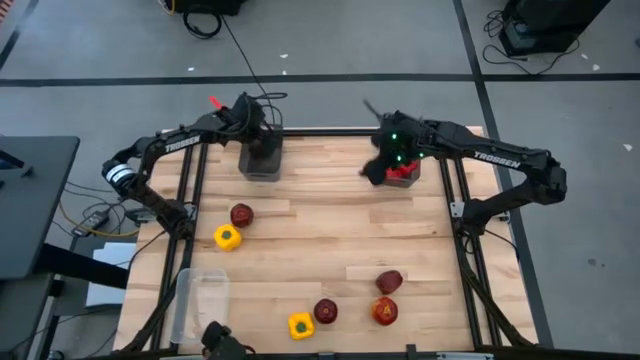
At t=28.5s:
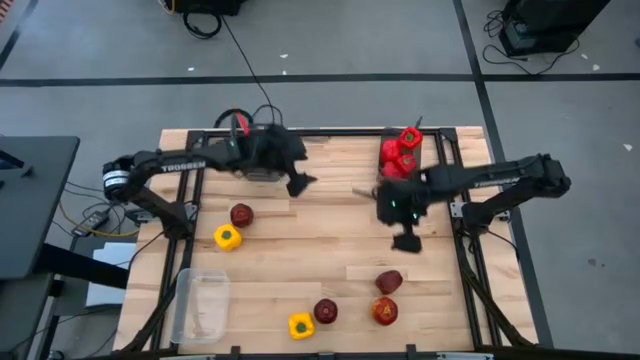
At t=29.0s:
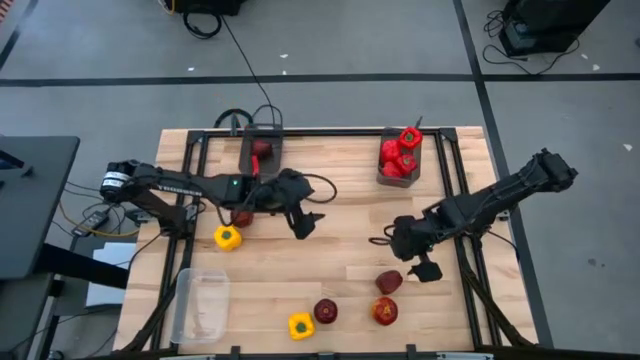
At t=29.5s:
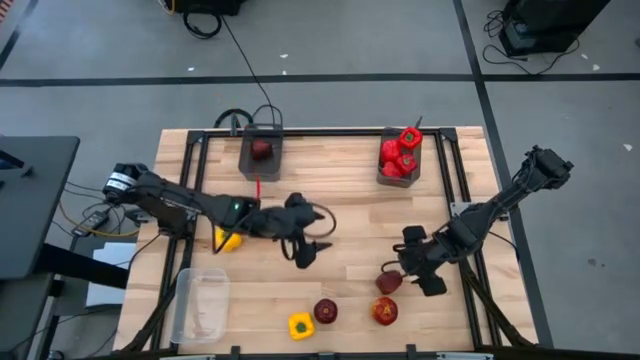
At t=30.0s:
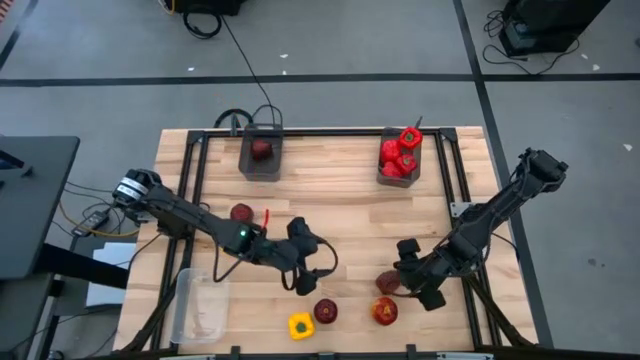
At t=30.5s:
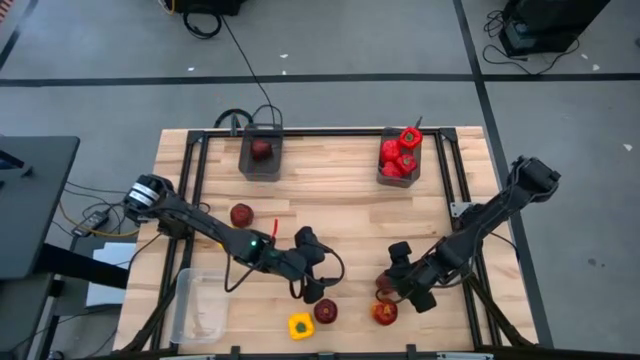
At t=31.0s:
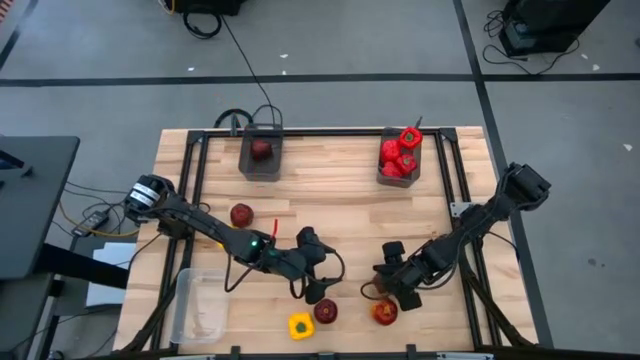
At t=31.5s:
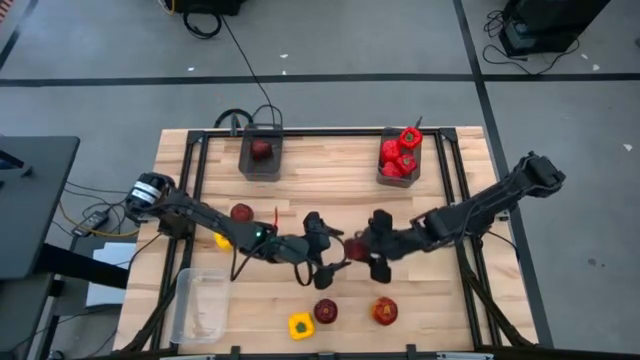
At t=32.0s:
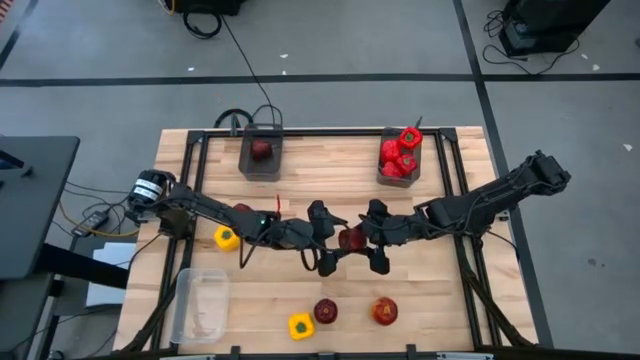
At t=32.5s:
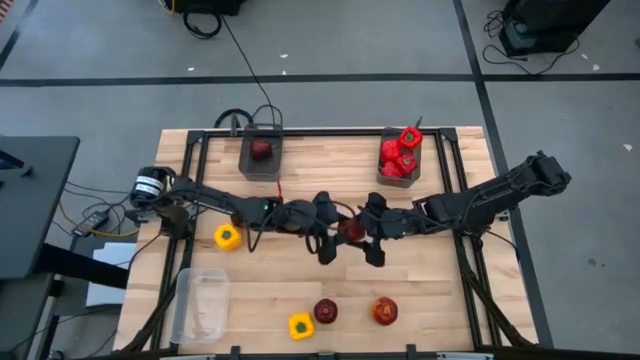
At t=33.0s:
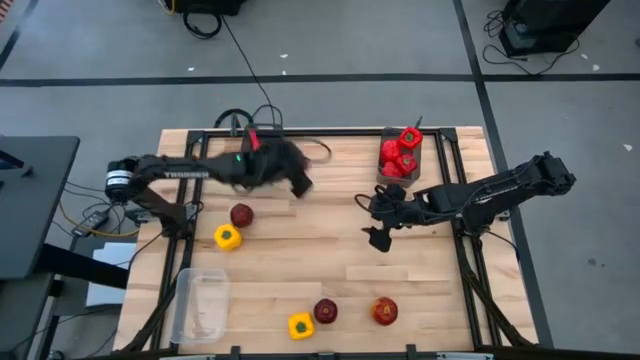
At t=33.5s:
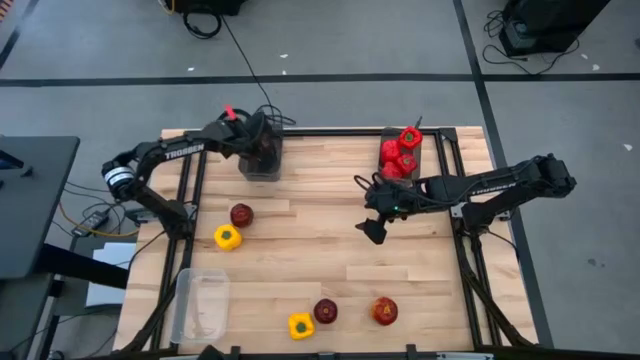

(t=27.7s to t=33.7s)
Task: Sort produce into baskets
Put the red apple into the top left black transparent bin

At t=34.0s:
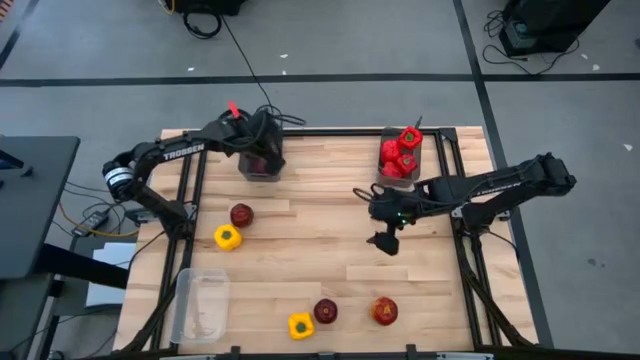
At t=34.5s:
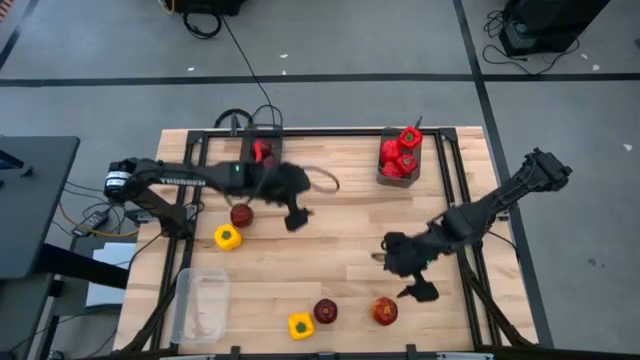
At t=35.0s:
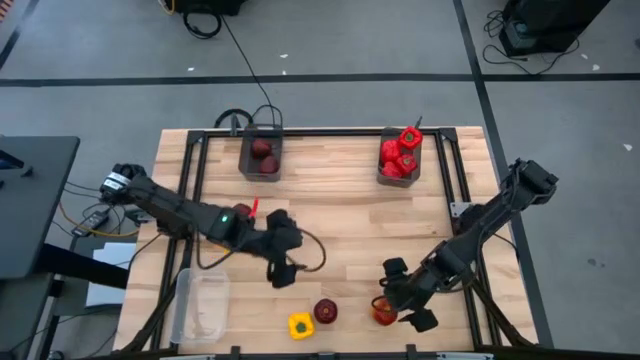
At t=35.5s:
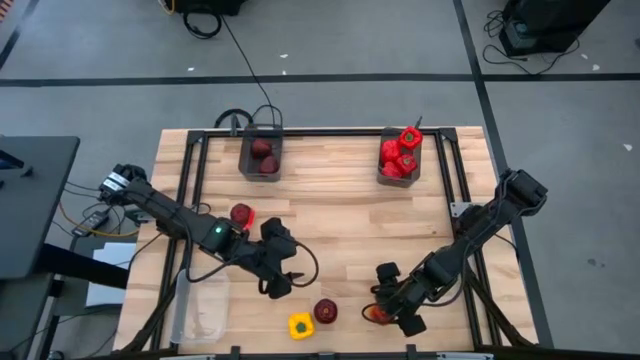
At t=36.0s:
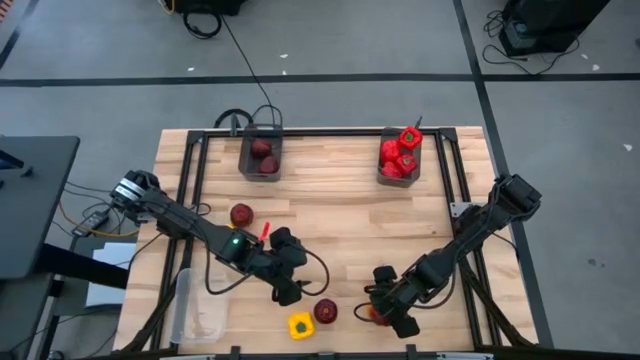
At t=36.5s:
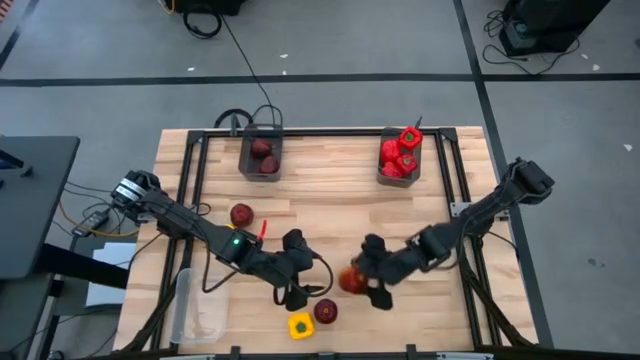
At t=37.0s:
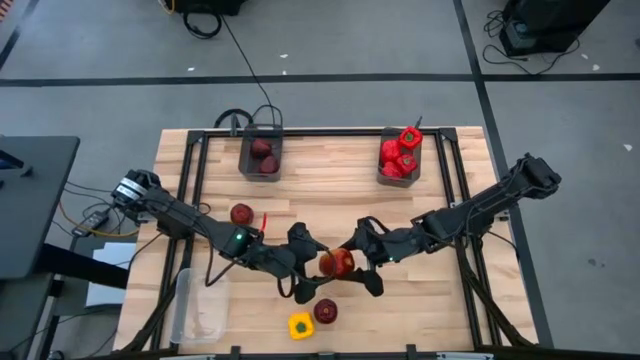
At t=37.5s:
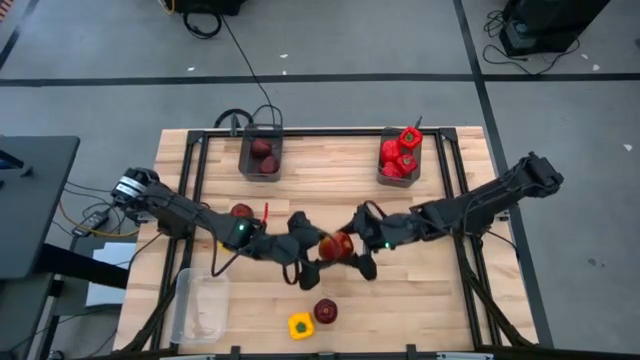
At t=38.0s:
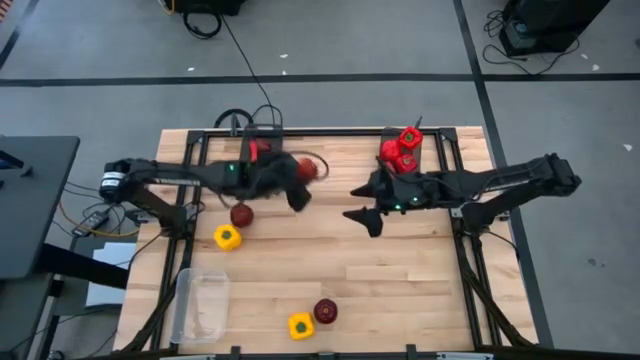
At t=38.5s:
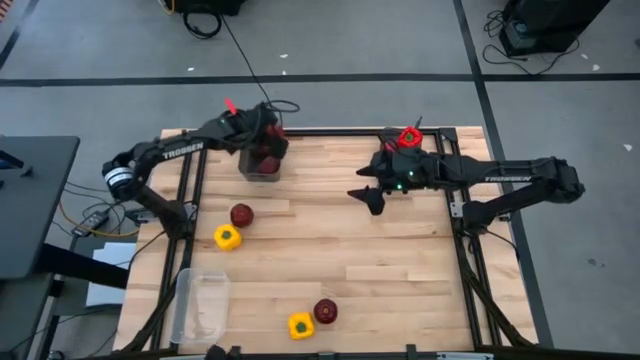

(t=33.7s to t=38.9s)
Put the red apple into the top left black transparent bin

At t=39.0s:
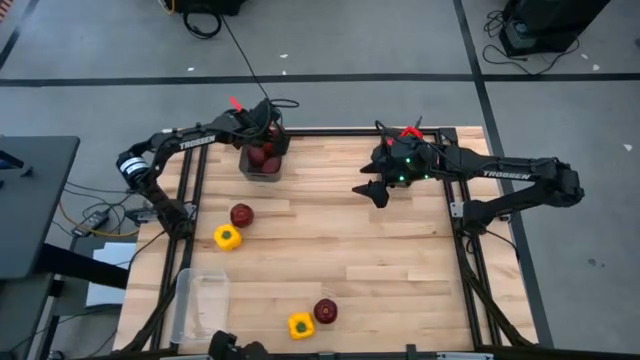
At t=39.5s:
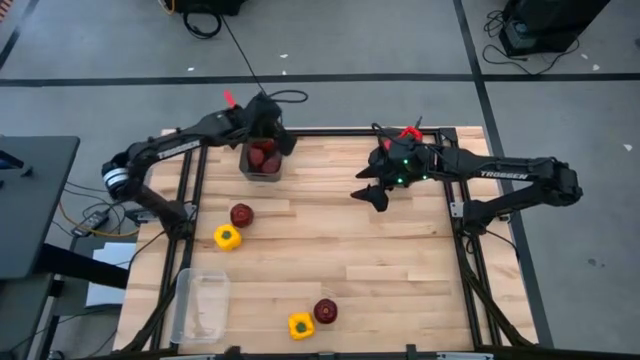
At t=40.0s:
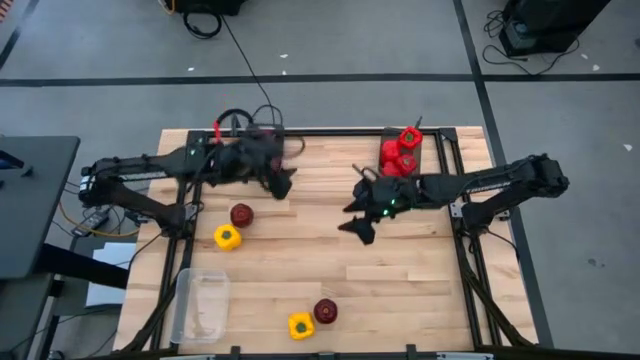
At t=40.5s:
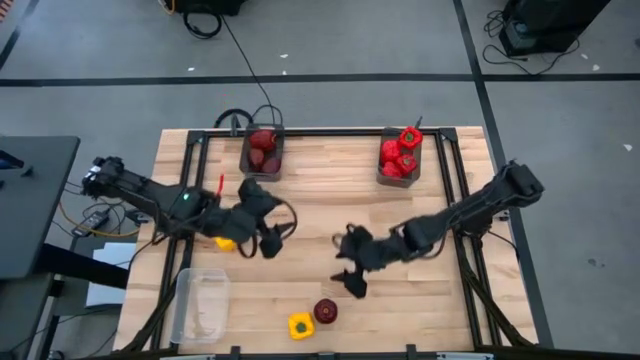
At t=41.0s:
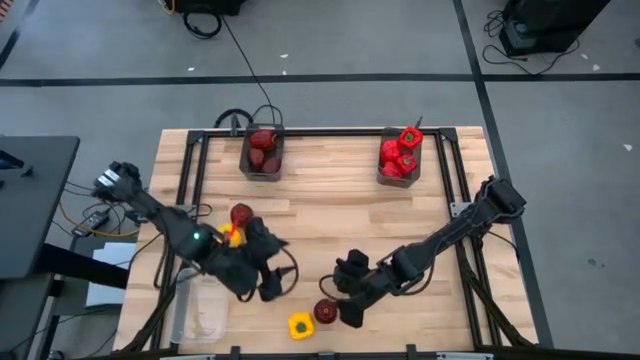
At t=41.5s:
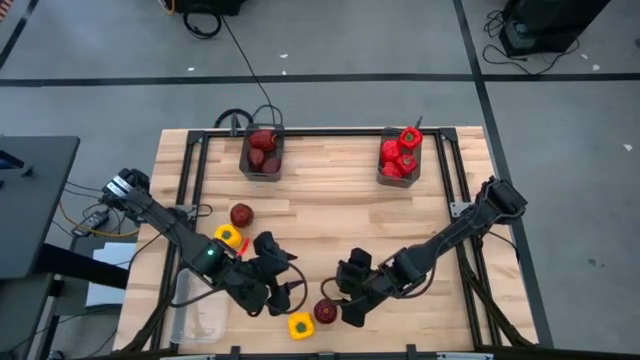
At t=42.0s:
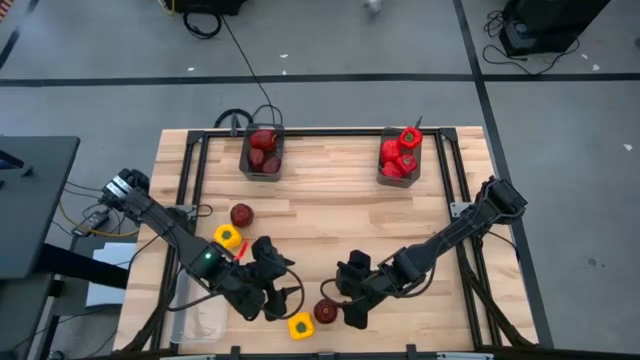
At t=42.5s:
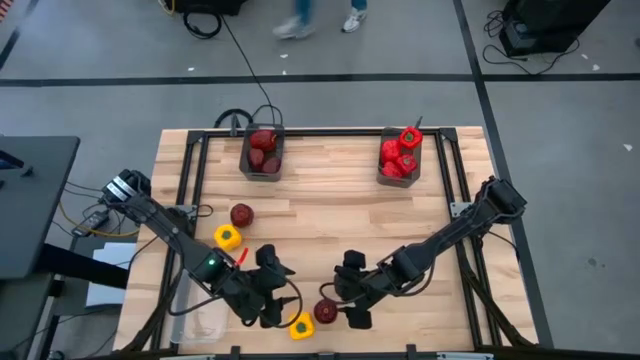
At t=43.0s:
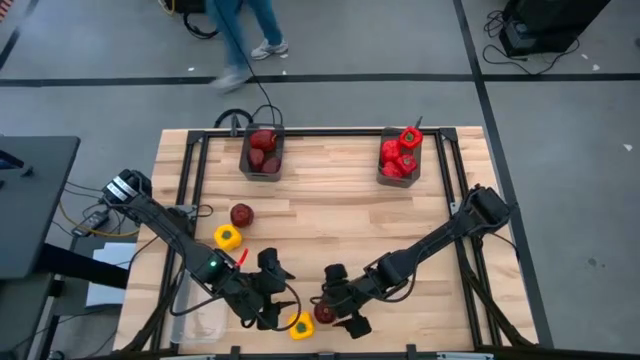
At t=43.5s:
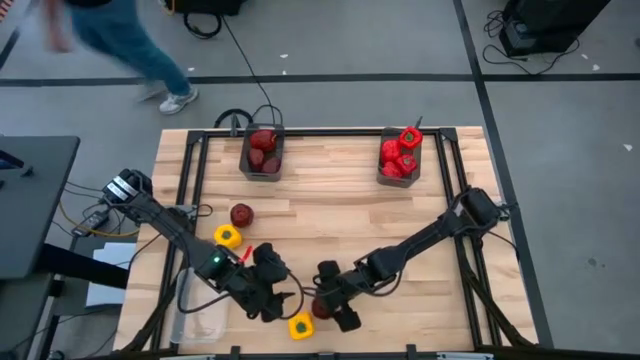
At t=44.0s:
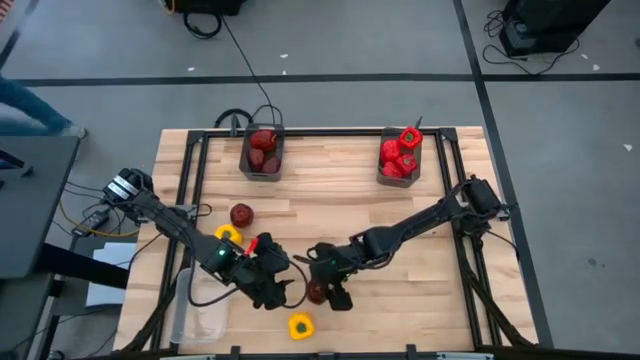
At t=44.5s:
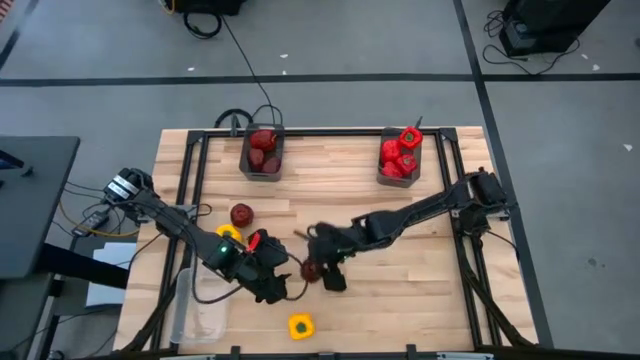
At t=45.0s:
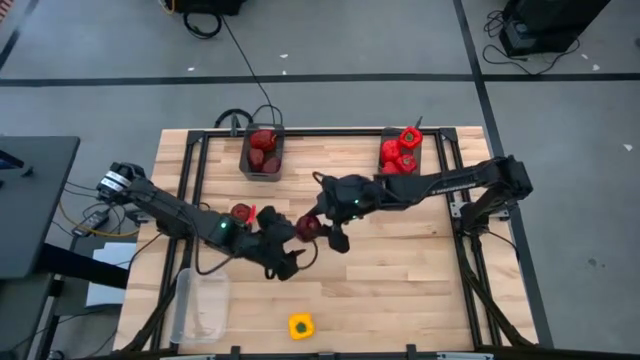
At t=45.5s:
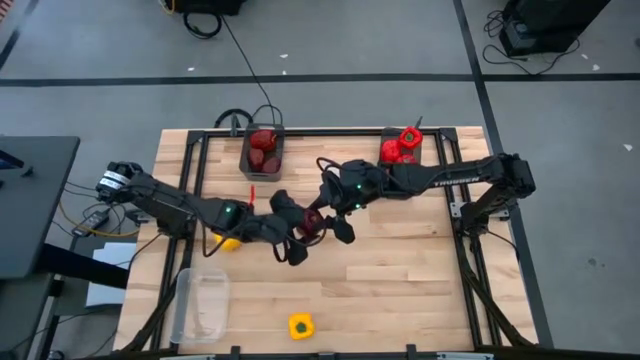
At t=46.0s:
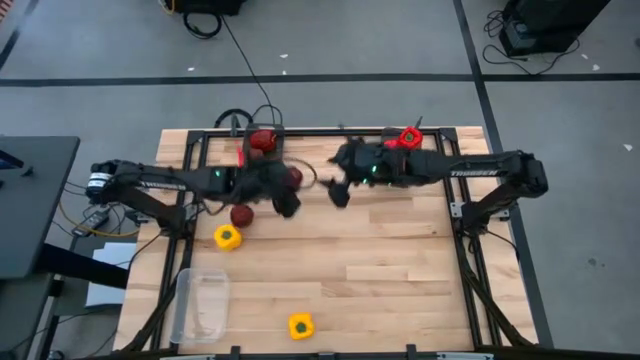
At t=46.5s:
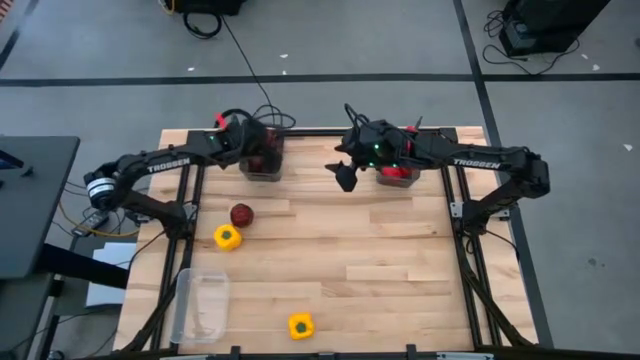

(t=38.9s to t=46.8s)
Put the red apple into the top left black transparent bin

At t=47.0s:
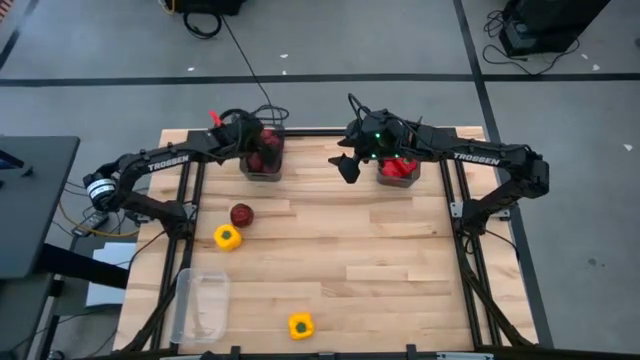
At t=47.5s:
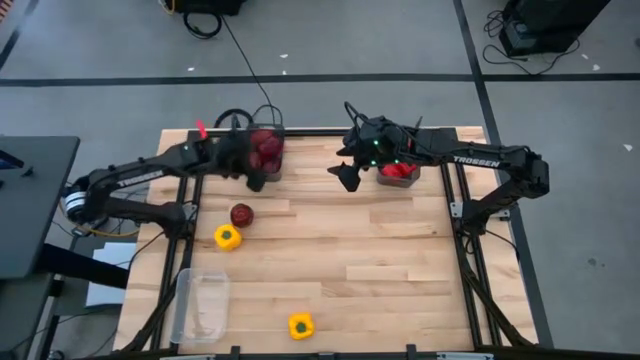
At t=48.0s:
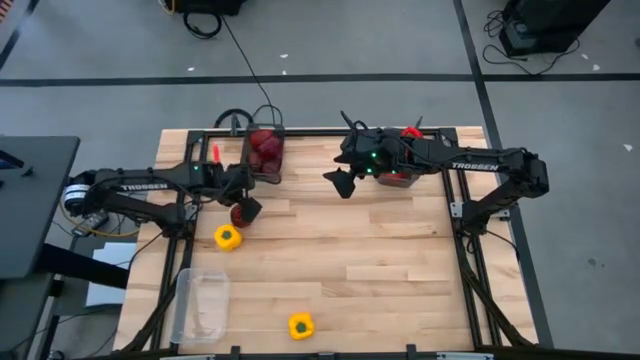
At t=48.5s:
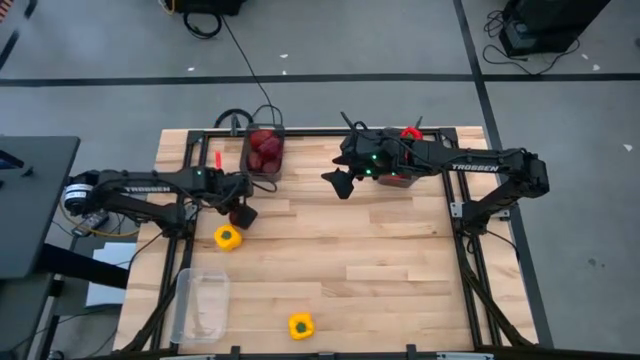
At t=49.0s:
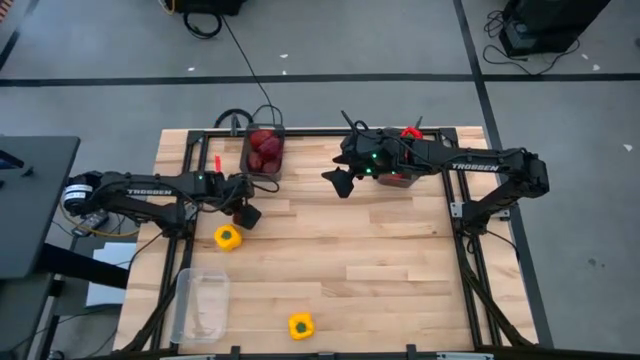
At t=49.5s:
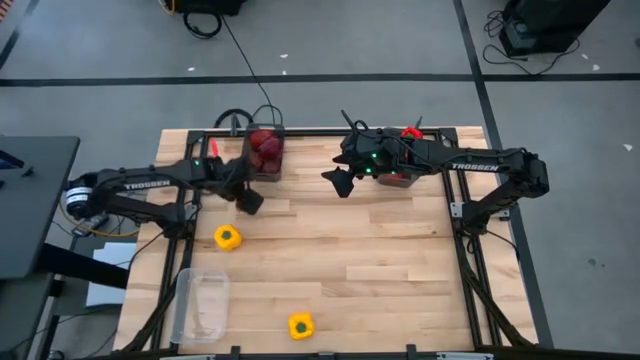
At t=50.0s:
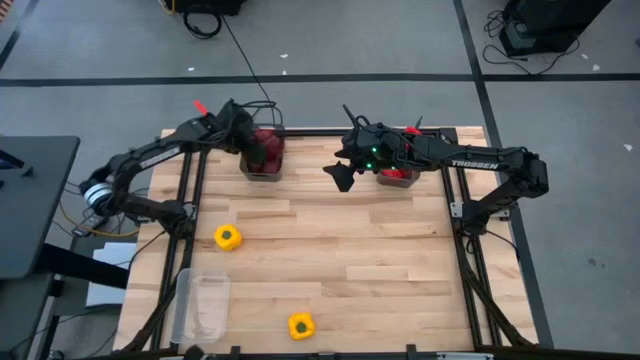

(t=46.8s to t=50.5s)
Put the red apple into the top left black transparent bin
